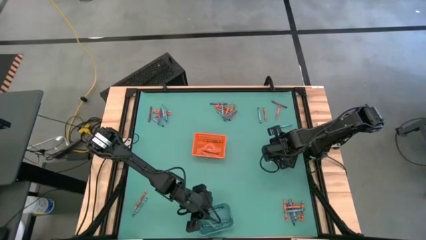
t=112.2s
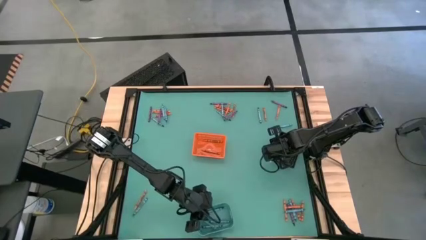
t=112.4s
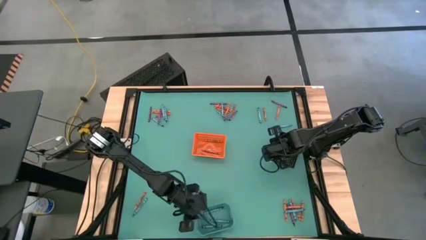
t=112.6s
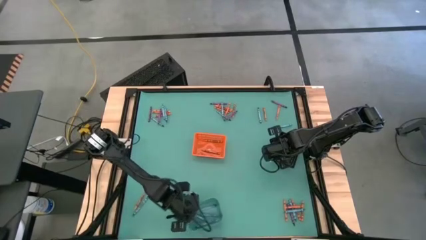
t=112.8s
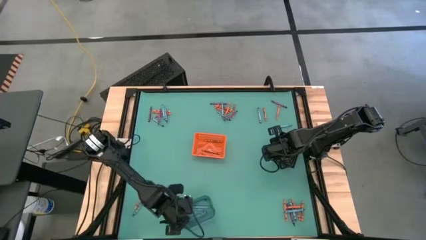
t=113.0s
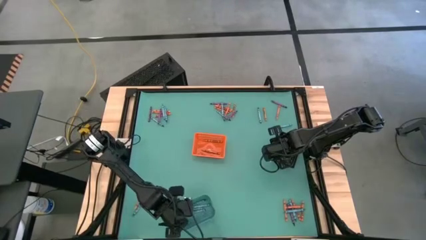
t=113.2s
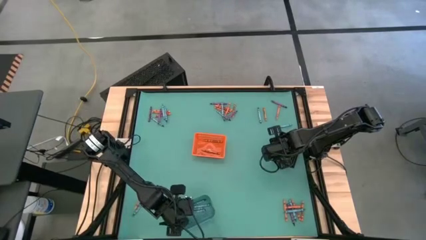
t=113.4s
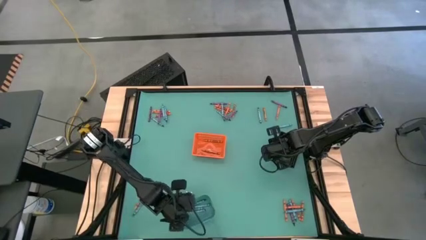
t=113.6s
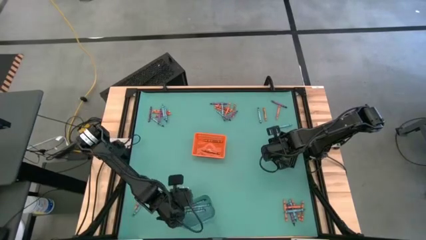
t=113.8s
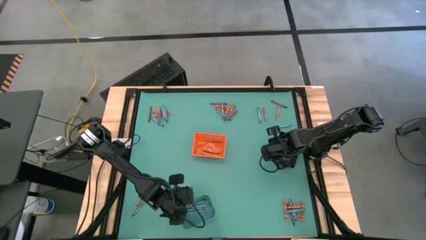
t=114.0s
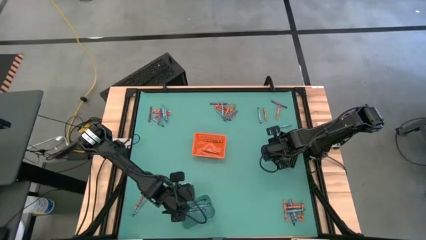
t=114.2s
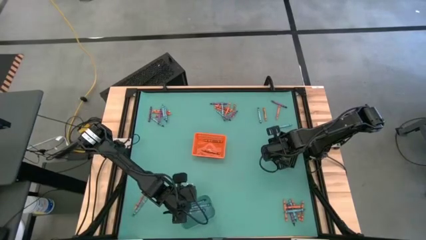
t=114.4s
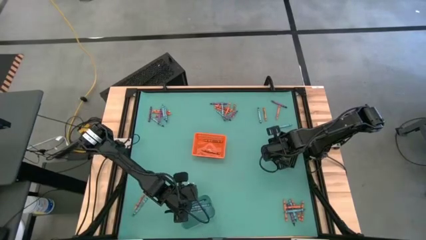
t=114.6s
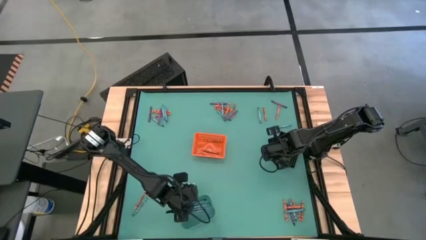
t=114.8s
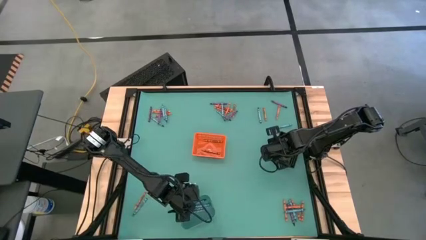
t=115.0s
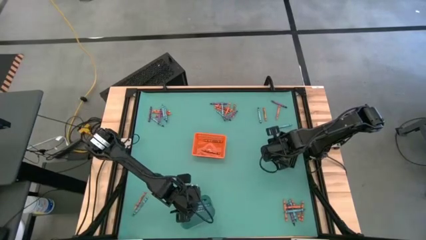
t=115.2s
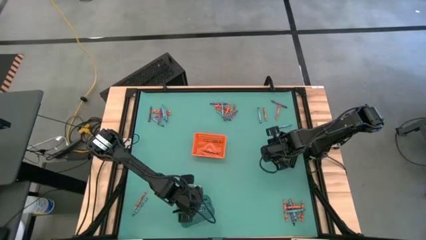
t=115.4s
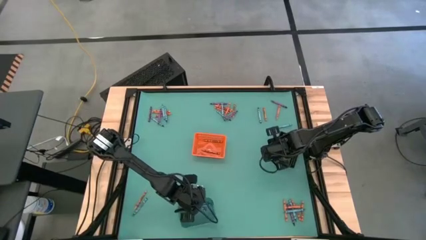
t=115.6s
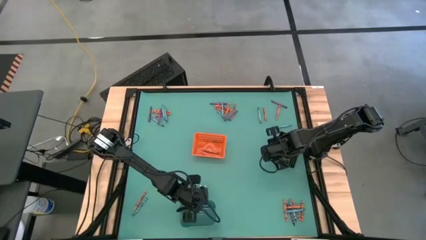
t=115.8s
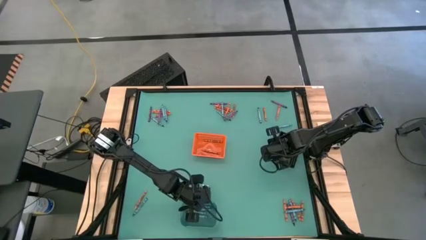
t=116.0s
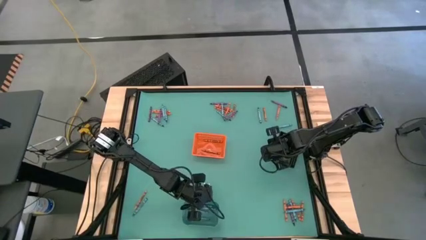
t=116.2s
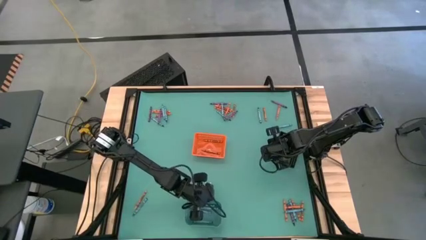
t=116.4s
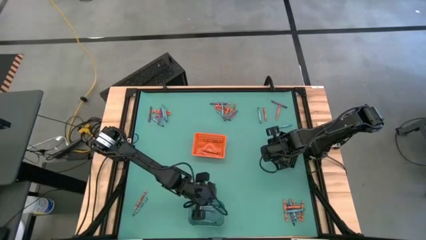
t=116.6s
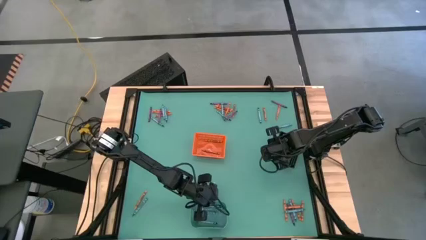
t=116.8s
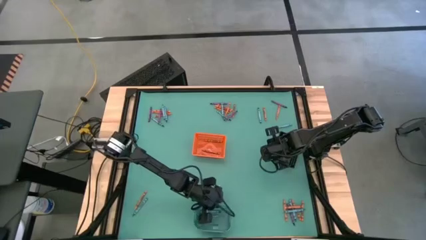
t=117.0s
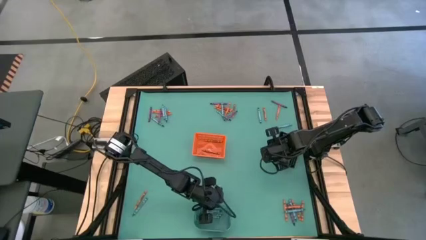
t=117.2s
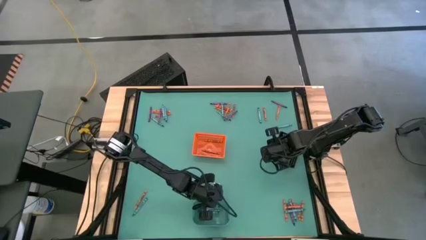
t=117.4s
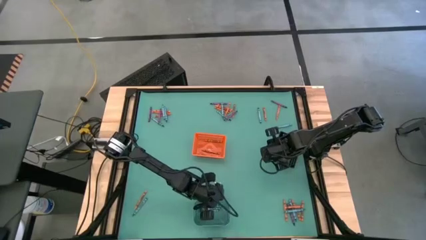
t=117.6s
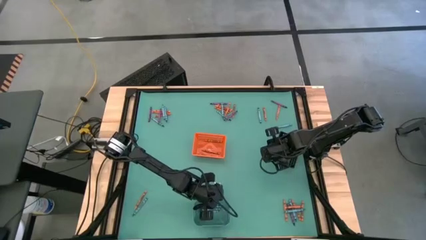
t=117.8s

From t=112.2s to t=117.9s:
Task: Sort crayons
Adjust the blue bin on the table

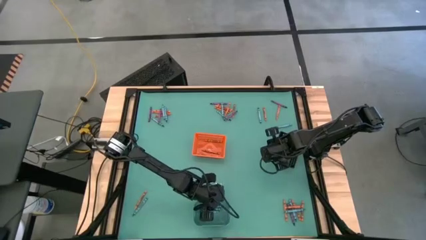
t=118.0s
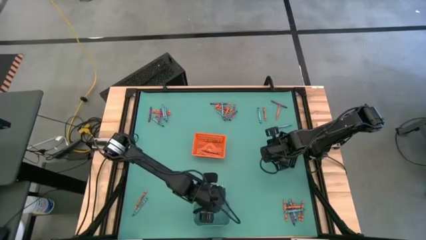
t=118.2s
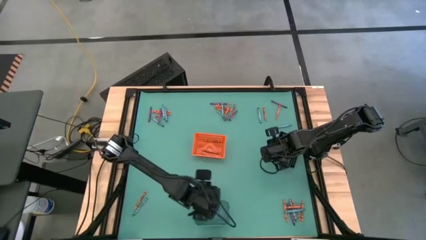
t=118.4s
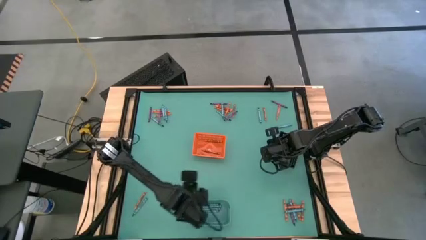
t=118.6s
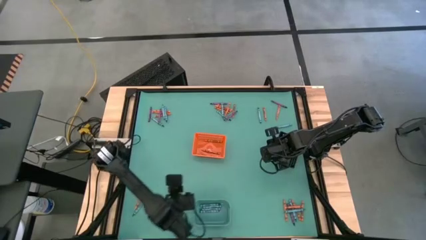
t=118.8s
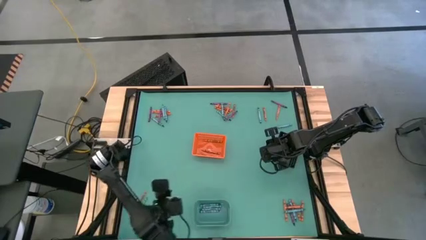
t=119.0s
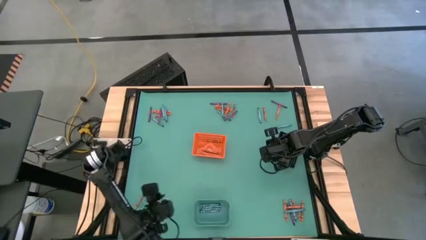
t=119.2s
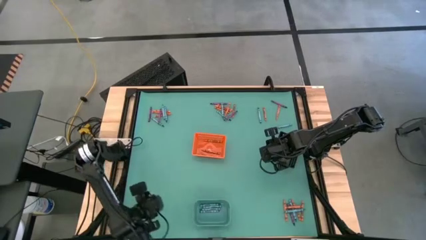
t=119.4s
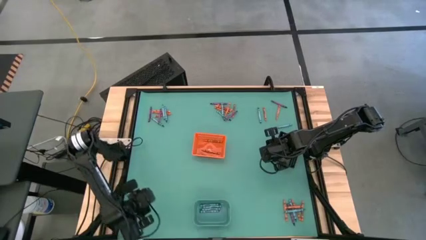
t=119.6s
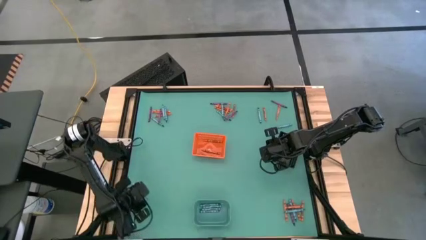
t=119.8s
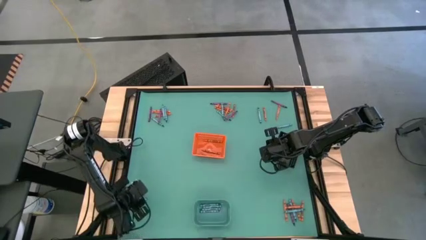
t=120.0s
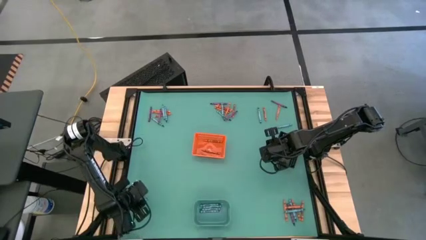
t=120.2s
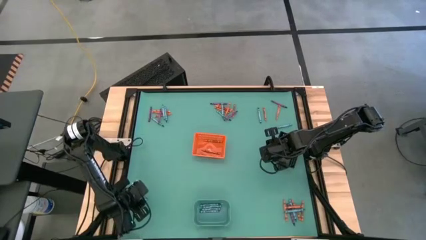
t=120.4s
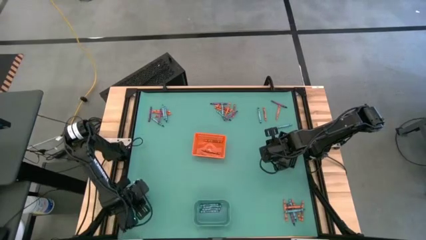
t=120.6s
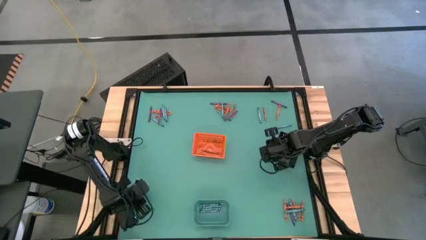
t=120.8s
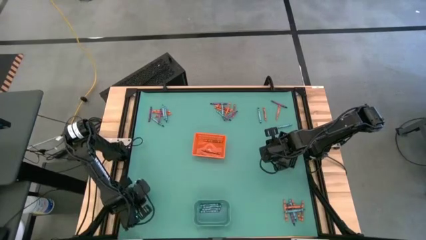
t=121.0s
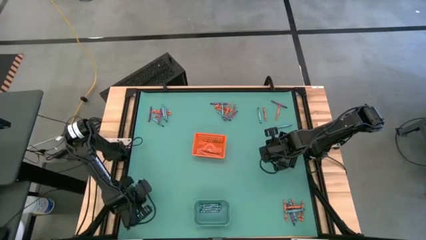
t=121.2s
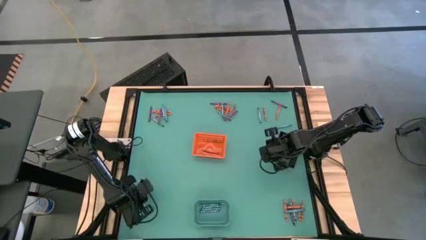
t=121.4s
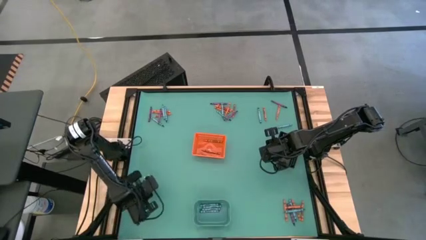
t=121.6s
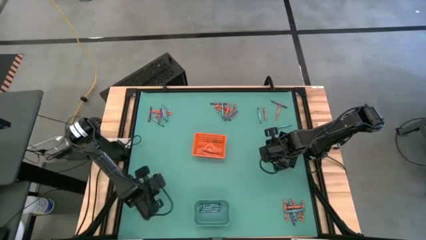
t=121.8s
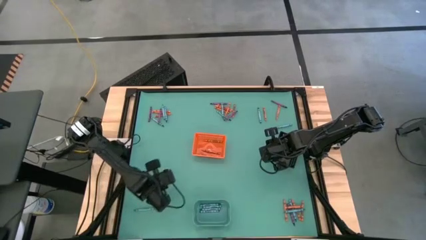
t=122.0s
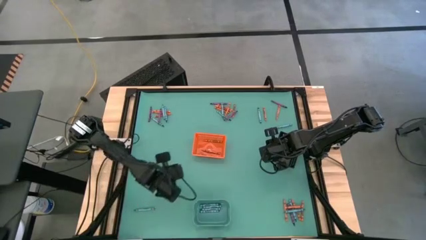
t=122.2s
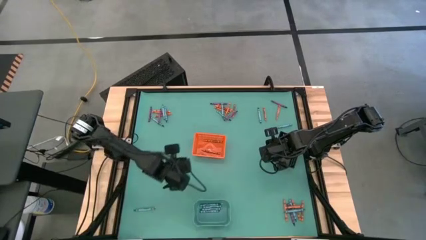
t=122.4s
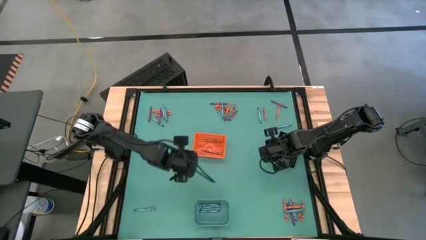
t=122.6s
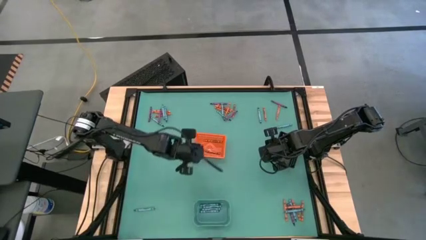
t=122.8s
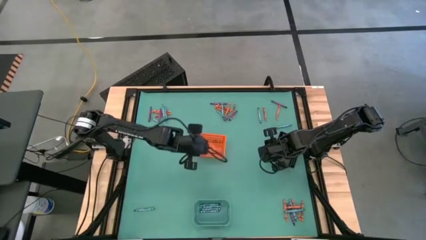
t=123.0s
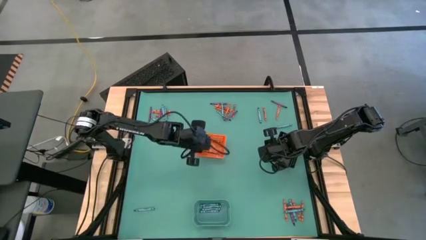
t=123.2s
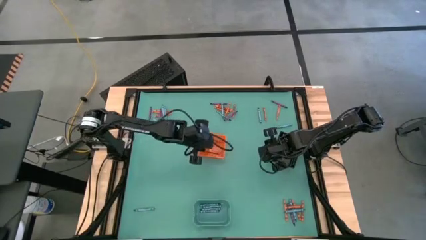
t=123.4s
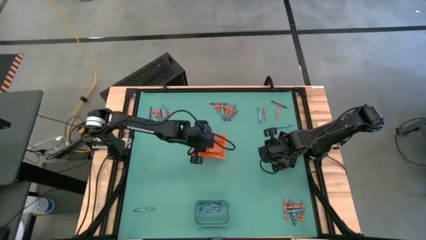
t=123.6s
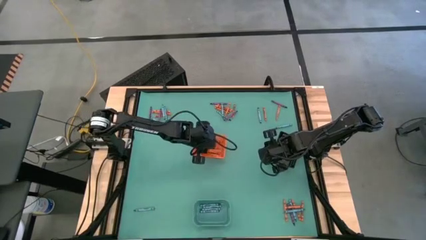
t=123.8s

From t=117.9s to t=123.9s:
Put the orange crayon into the orange bin

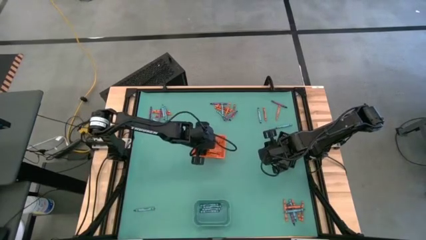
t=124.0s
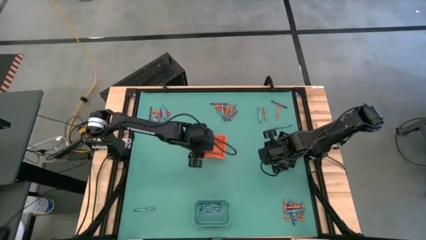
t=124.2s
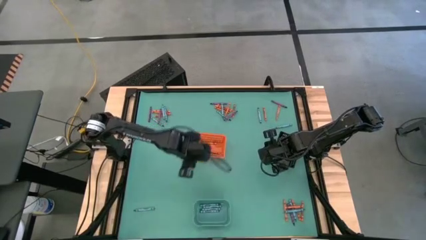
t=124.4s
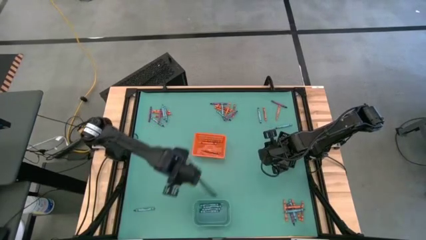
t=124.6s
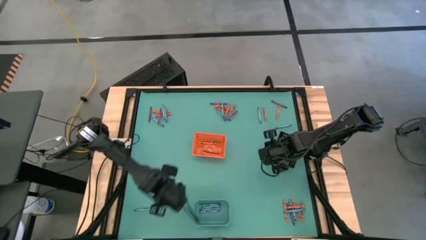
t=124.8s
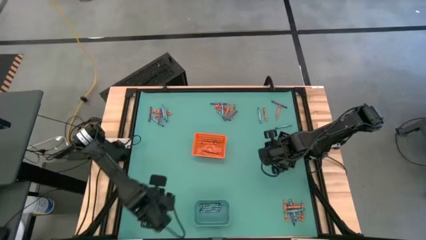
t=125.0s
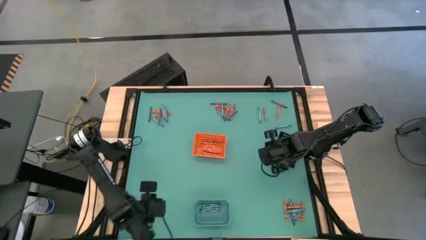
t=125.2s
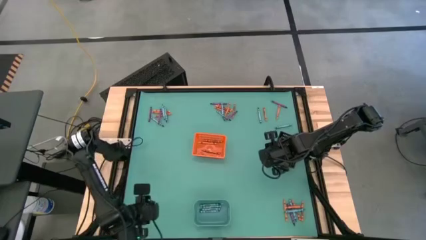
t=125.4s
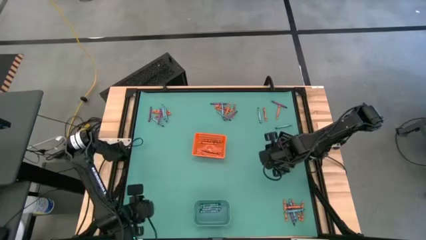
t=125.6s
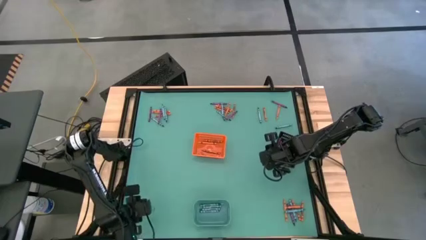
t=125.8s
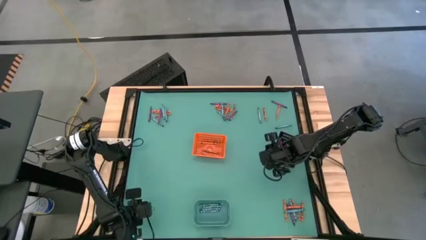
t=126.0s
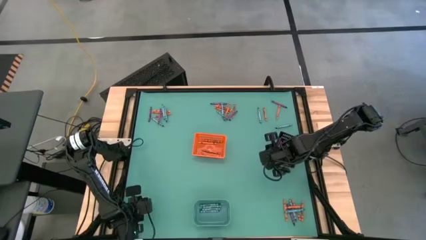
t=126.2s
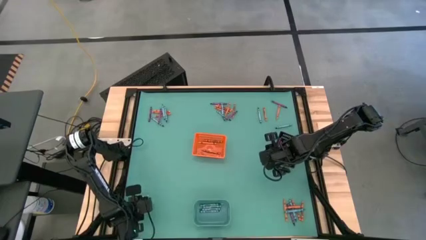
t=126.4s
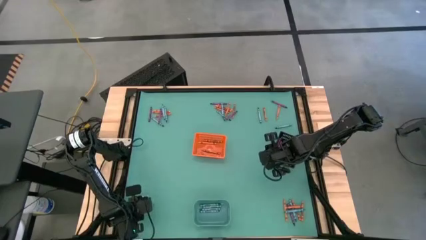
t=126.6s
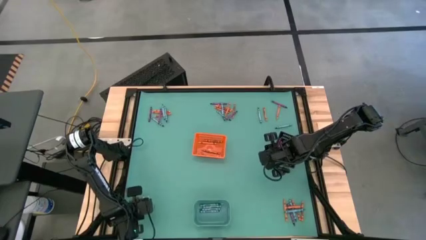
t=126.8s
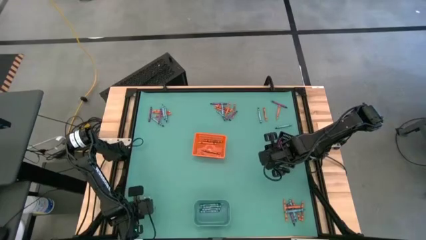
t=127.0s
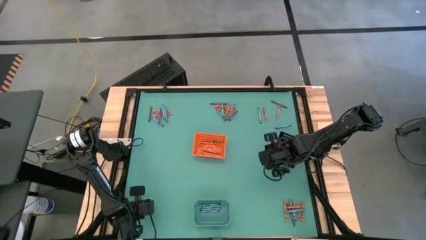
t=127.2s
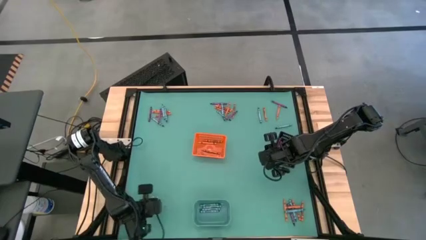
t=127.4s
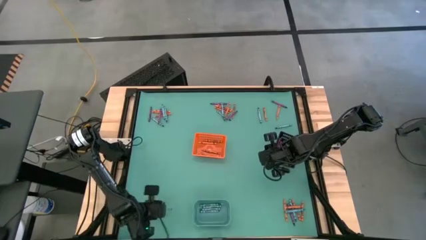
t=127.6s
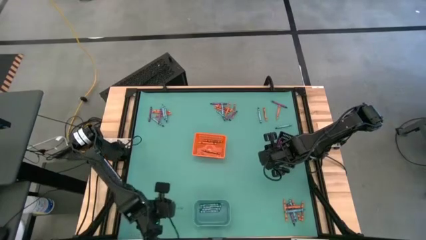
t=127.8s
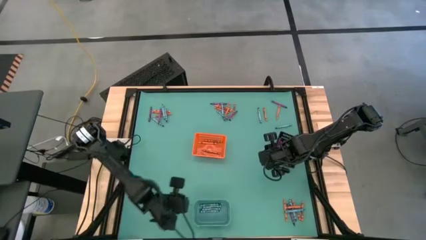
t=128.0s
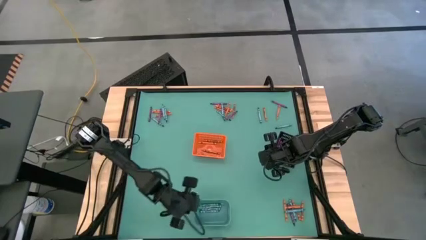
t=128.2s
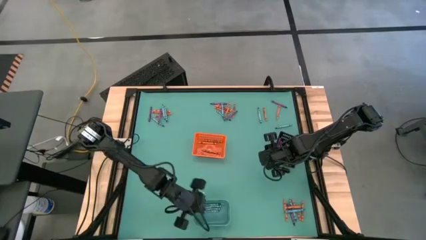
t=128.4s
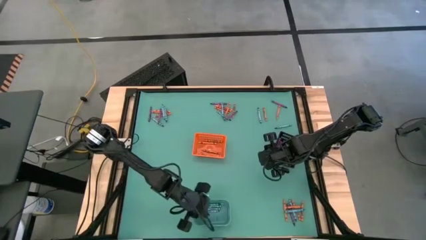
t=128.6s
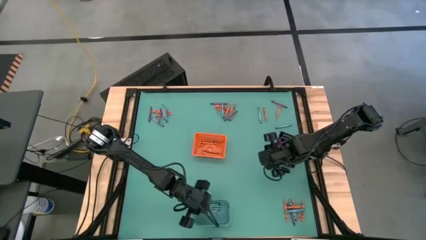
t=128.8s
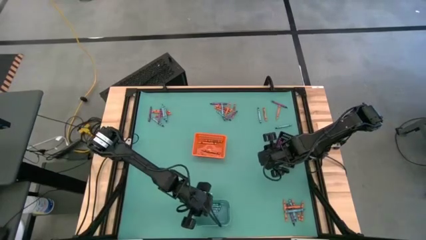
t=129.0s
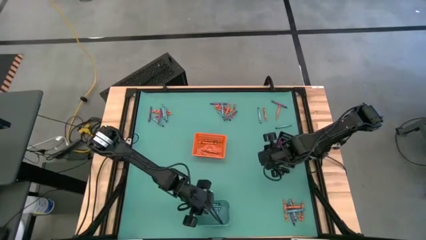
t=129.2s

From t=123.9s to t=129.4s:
Put the blue crayon into the blue bin
